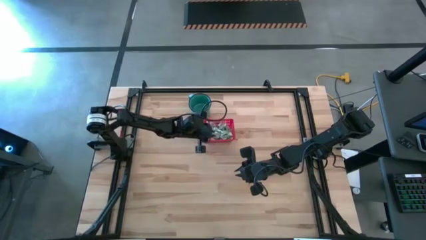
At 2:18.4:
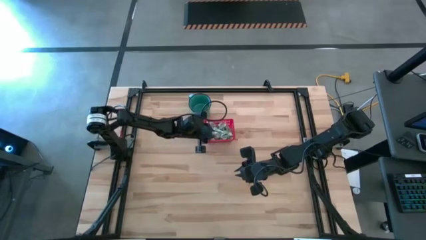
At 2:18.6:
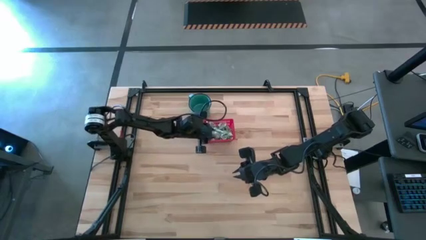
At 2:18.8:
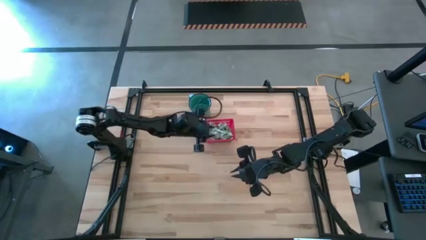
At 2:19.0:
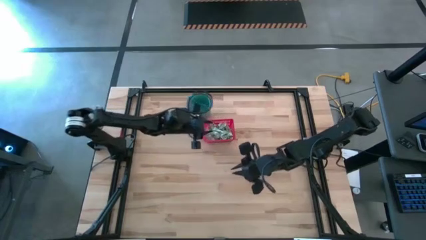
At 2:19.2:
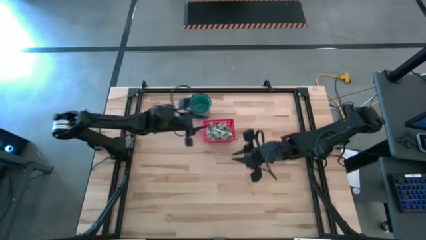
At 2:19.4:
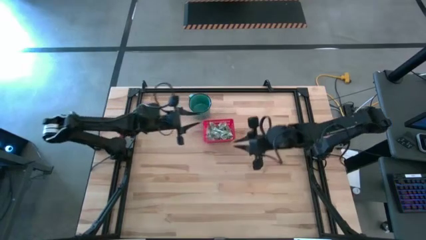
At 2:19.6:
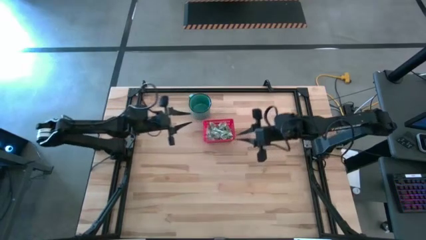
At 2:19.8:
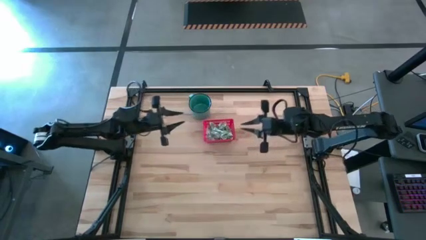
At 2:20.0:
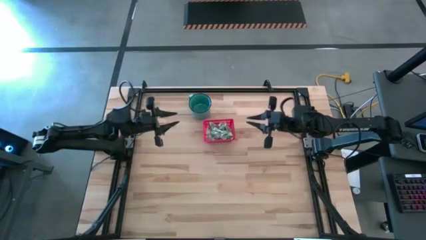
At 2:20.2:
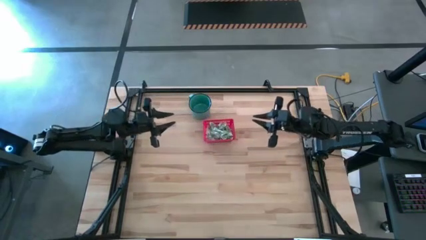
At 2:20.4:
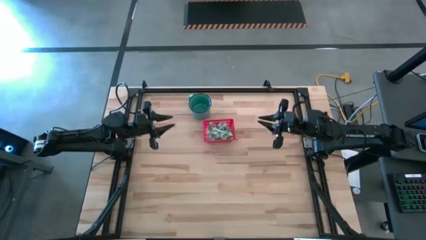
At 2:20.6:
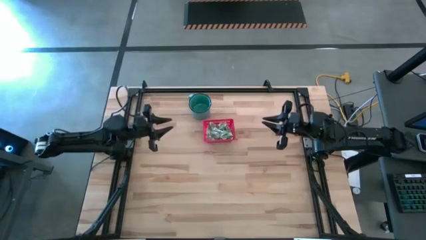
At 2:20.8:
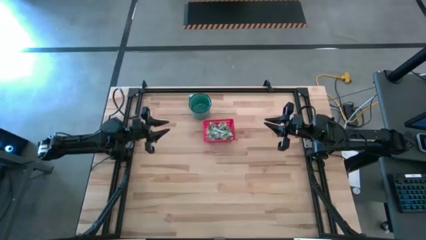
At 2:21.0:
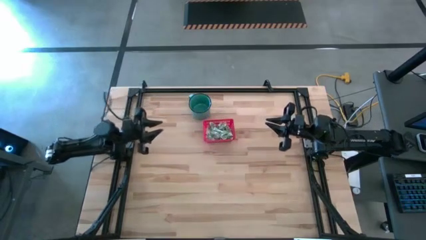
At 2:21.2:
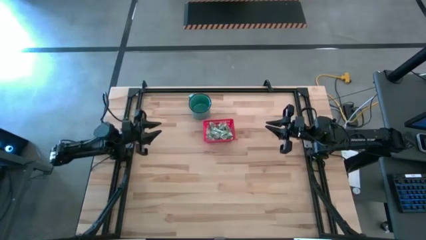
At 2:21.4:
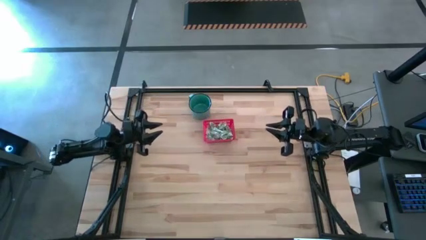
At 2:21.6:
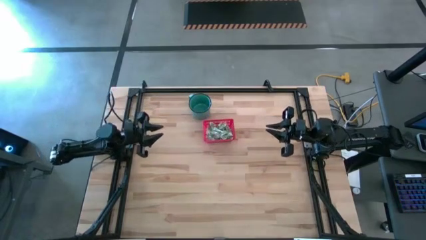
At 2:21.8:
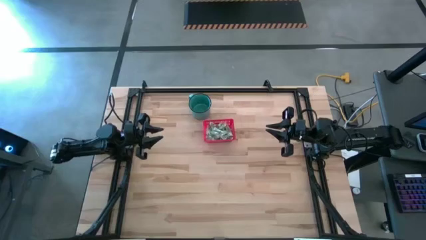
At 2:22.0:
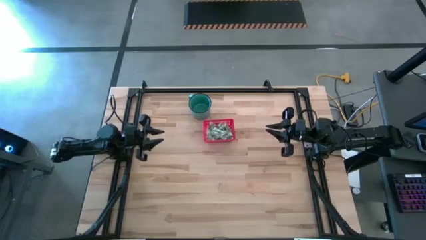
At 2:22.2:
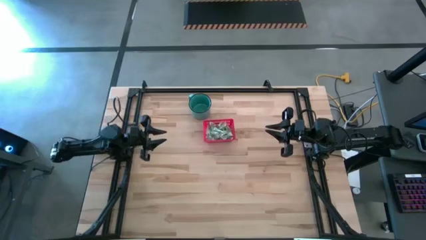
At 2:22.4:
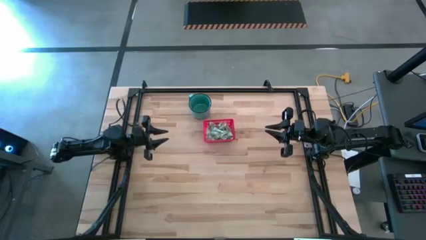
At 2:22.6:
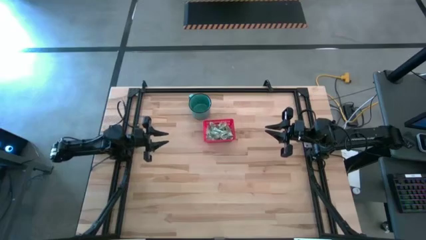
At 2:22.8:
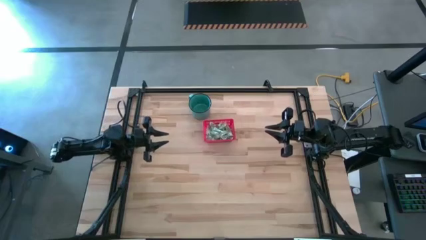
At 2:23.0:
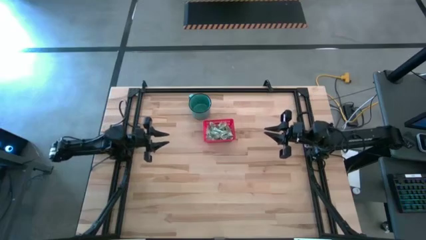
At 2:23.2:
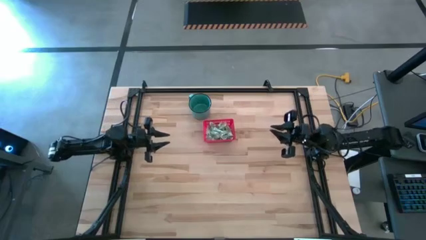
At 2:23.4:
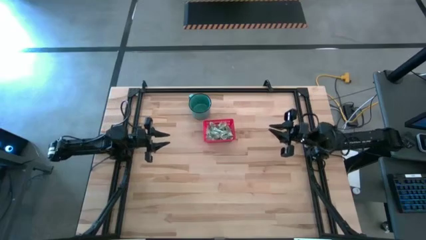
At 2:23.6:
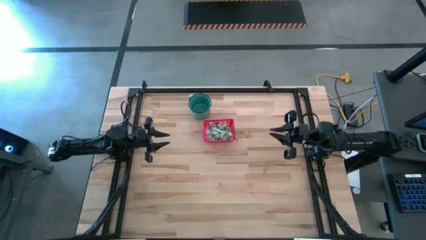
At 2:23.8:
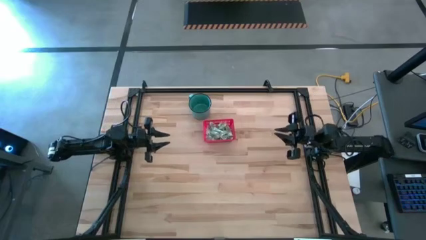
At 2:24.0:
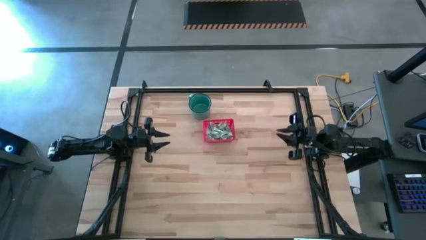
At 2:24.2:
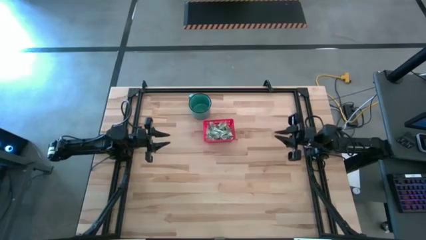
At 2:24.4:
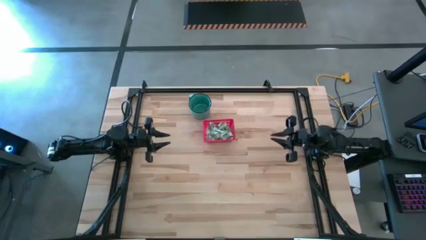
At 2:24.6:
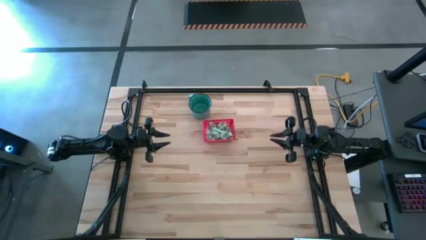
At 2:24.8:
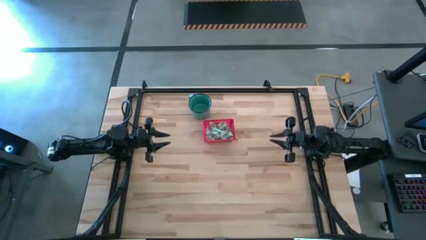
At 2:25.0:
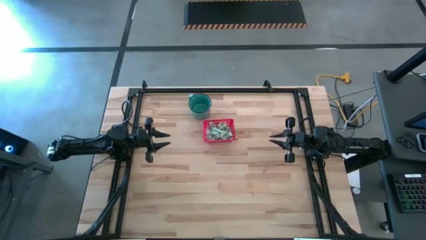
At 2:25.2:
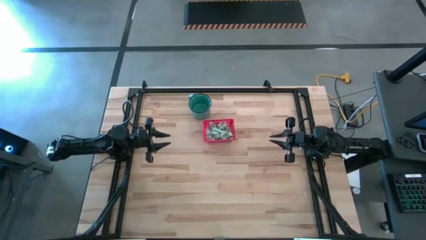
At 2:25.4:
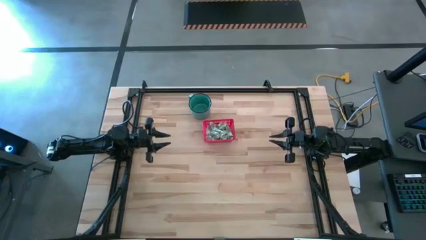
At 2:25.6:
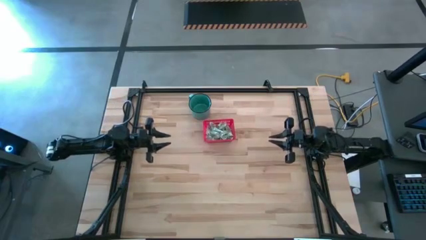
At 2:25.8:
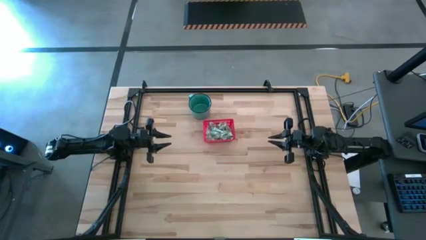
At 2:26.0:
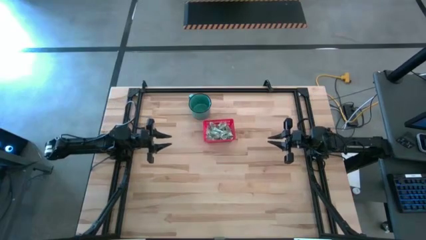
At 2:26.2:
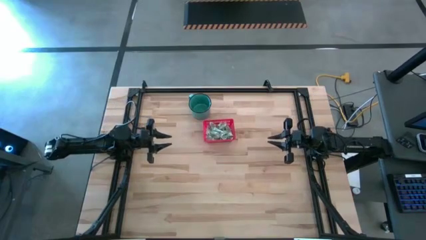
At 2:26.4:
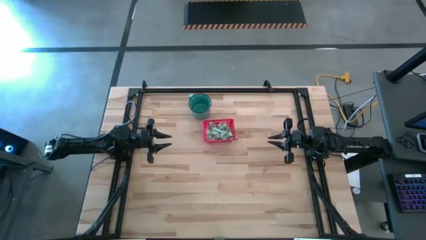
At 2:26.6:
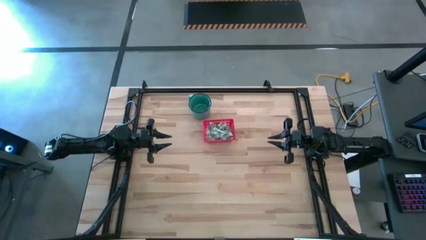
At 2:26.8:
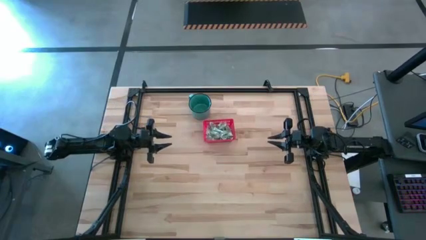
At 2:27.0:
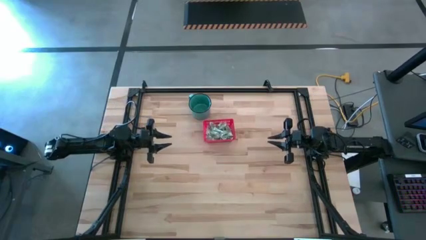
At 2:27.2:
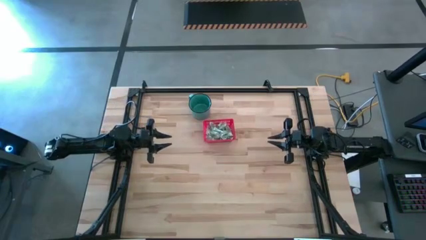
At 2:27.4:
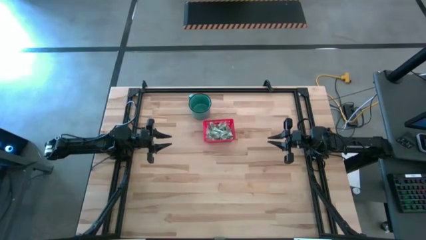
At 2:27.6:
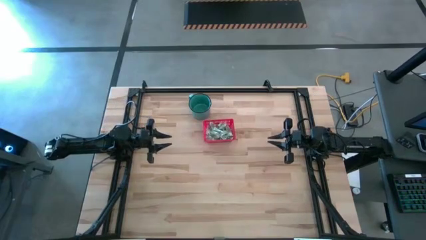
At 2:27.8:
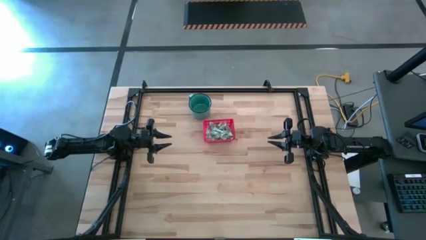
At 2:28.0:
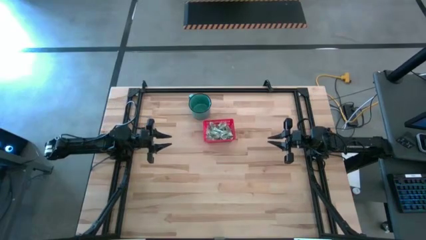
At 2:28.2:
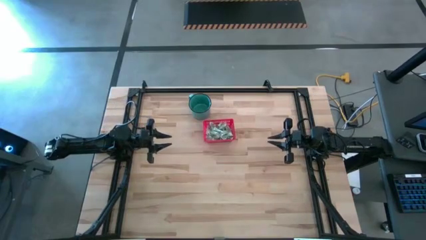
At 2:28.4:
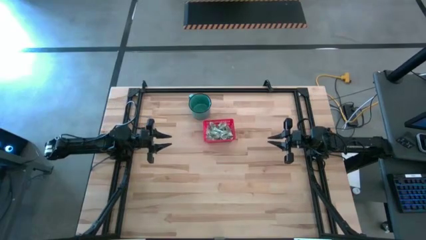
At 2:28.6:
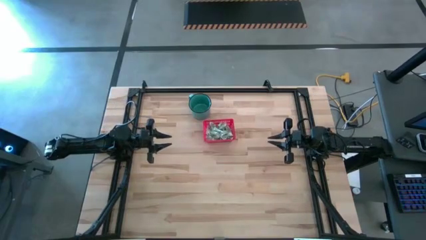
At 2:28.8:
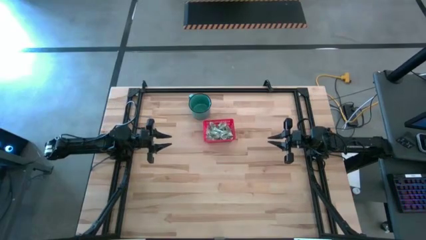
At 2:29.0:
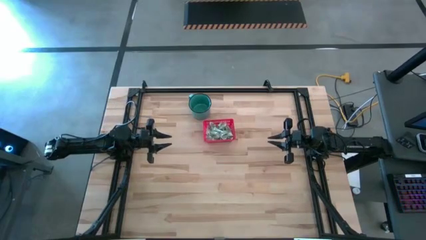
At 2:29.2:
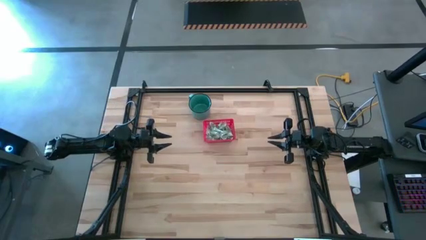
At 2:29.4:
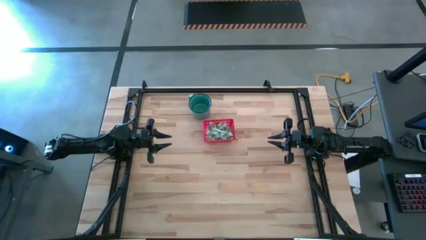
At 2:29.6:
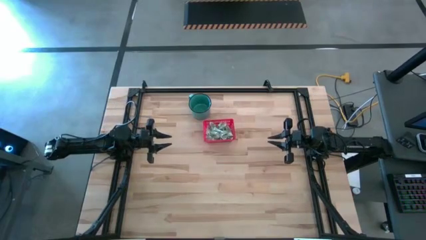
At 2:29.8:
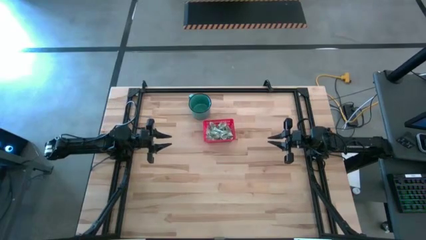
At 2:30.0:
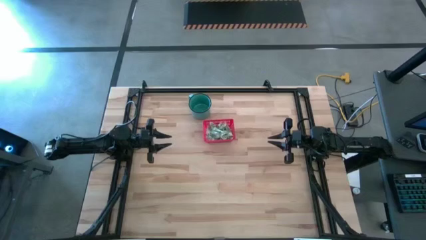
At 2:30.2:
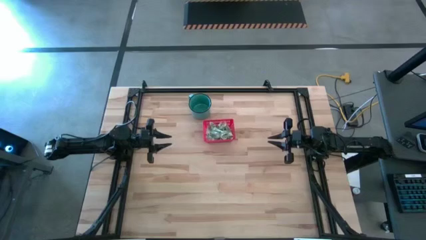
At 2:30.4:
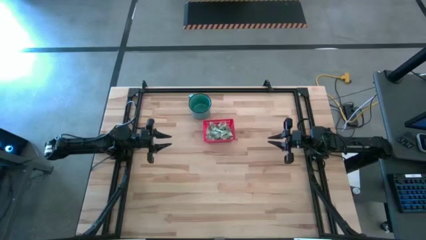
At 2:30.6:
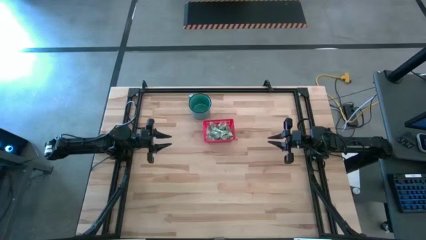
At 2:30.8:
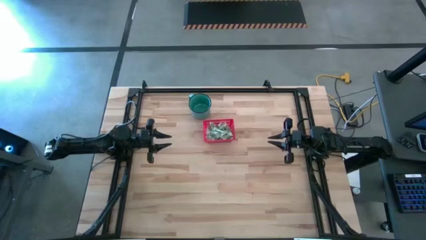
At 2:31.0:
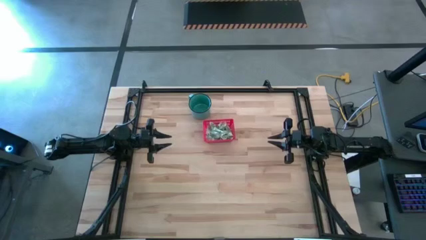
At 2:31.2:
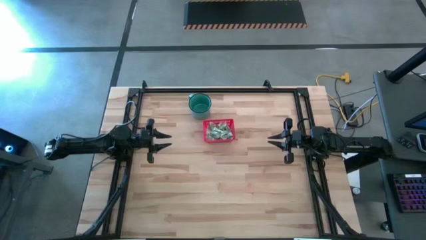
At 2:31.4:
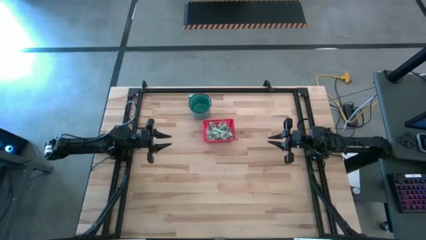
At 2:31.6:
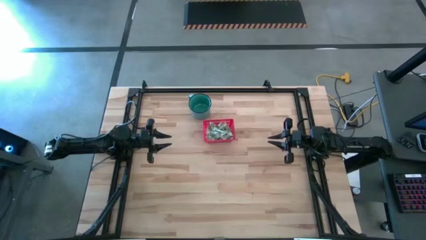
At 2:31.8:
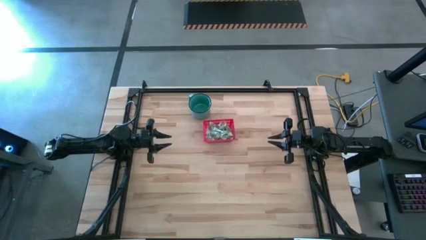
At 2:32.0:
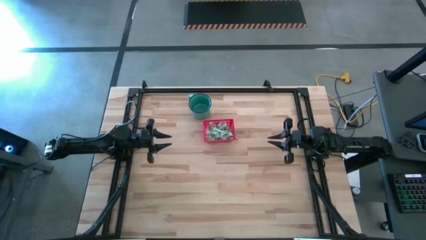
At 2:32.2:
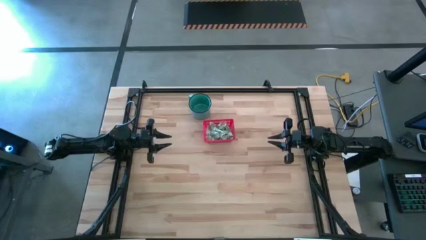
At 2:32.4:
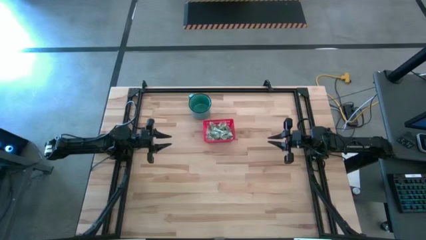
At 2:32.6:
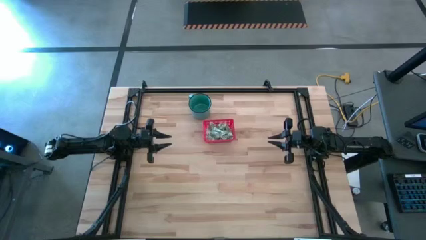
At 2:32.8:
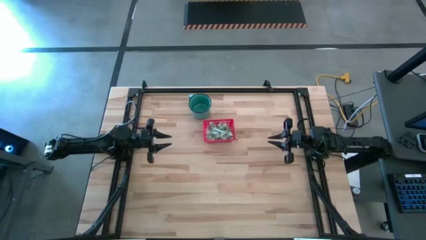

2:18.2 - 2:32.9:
Task: Pick and place items into bin
Return to Home Position

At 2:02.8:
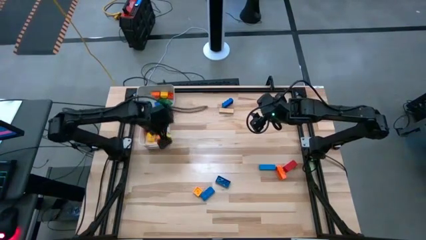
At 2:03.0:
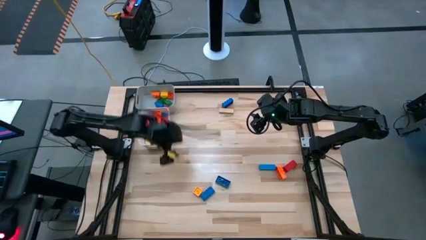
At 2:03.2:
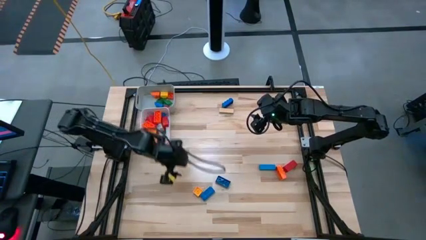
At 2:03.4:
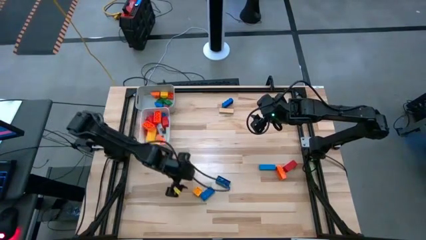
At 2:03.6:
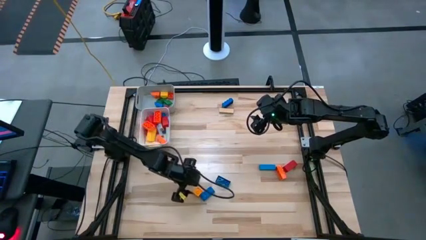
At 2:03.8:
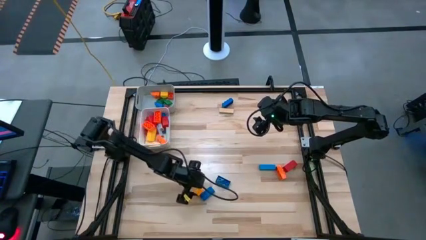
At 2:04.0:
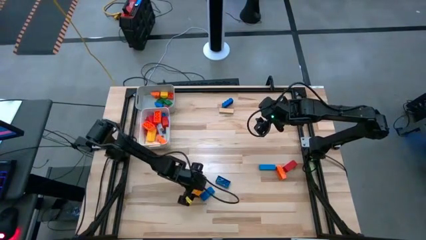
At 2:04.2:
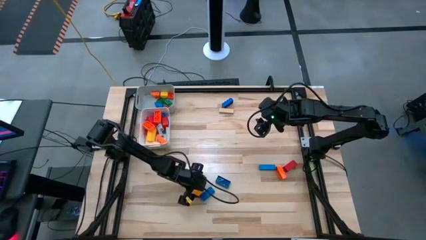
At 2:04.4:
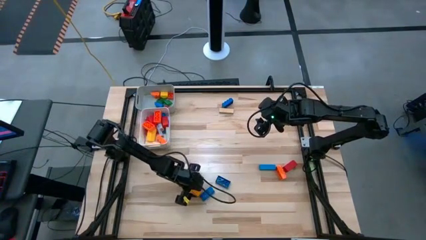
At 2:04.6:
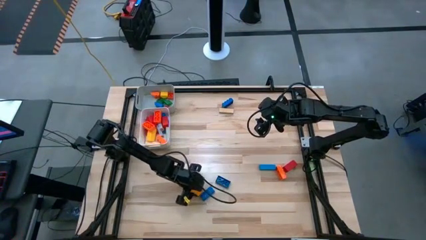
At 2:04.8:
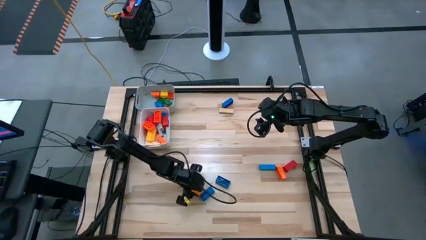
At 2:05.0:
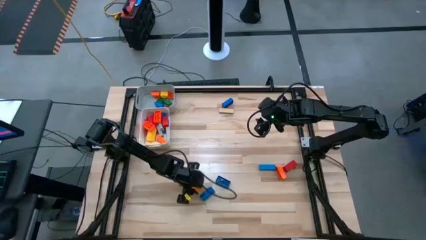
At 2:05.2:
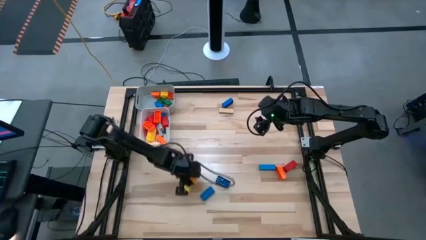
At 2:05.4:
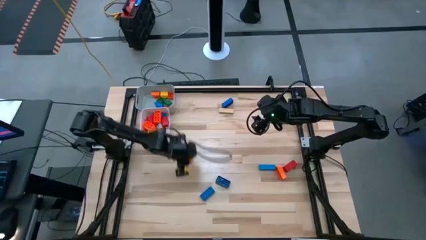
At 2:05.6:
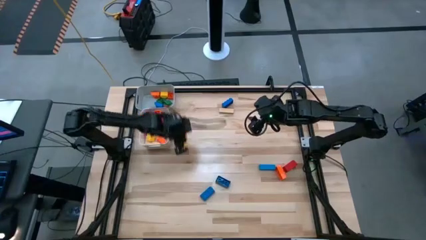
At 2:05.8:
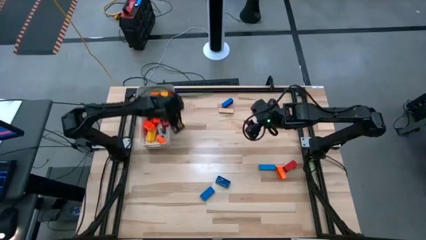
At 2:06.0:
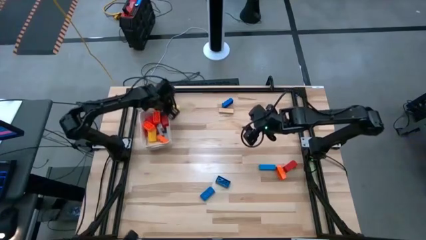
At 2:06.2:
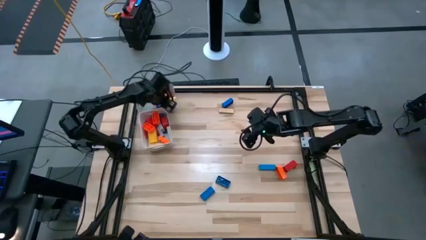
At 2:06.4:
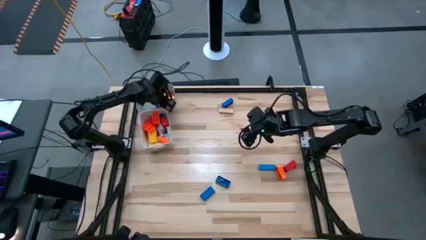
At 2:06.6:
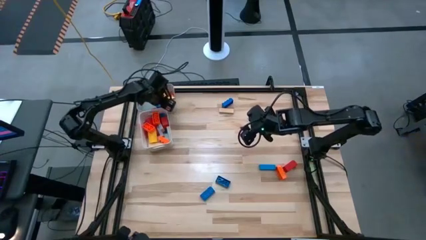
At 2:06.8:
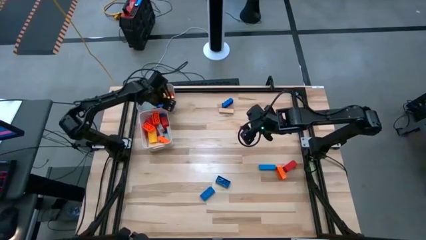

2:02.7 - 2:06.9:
Task: Sort blocks by size
Put the small yellow game piece into the gray bin
